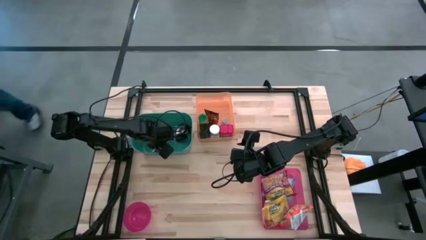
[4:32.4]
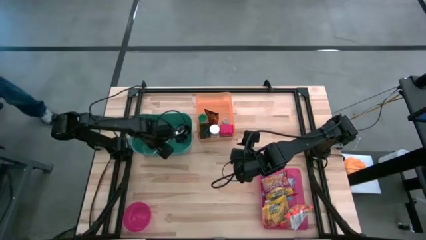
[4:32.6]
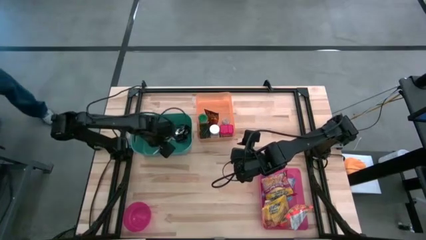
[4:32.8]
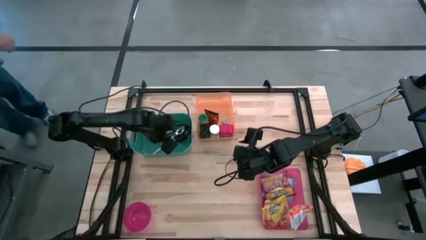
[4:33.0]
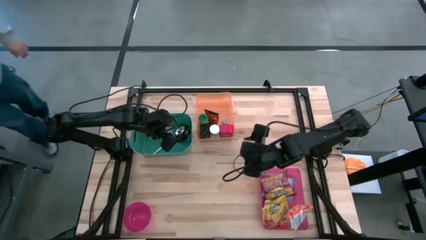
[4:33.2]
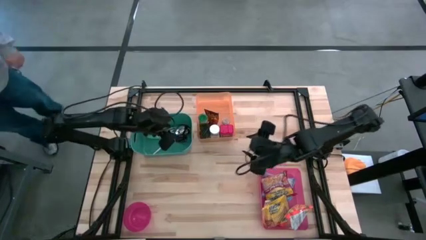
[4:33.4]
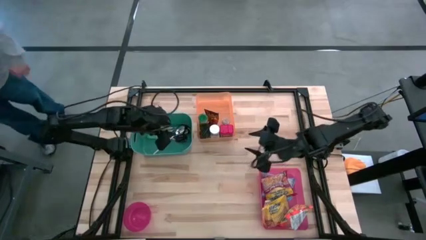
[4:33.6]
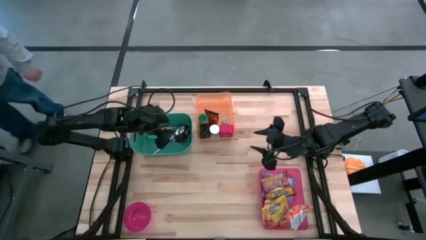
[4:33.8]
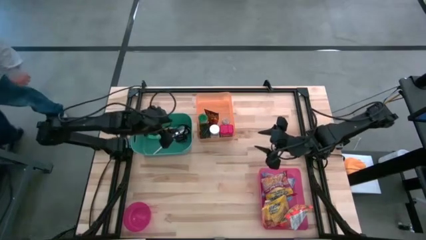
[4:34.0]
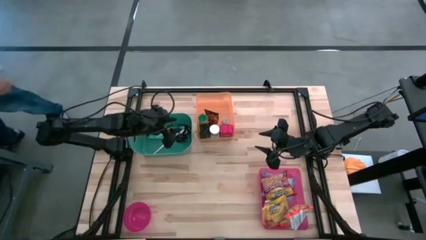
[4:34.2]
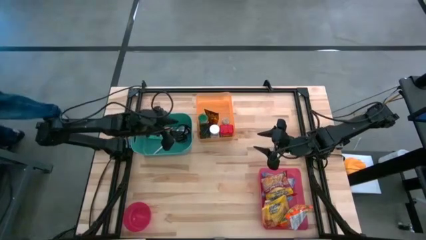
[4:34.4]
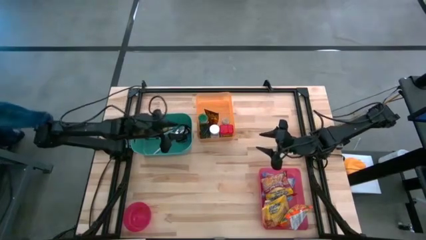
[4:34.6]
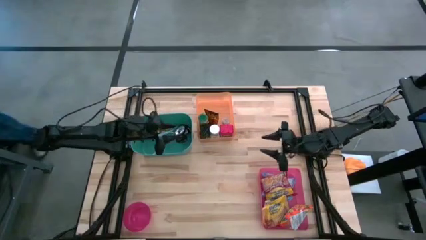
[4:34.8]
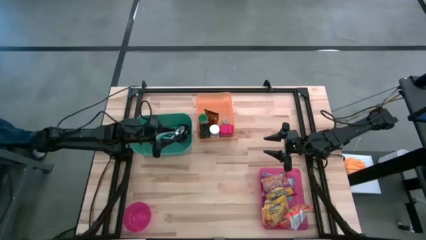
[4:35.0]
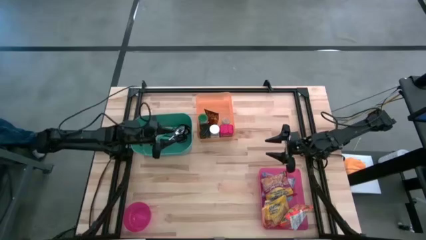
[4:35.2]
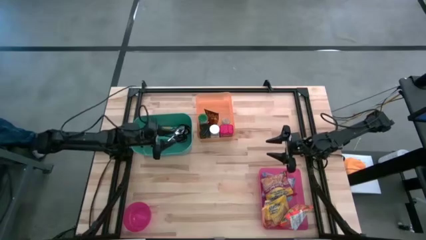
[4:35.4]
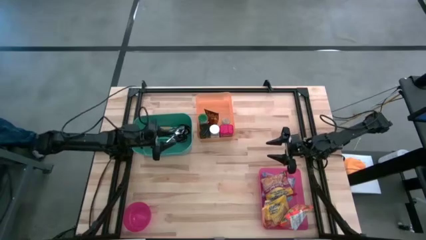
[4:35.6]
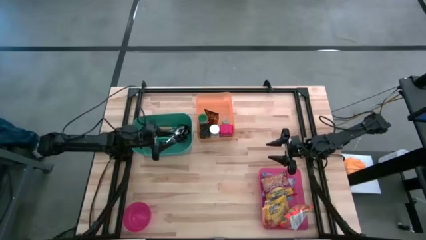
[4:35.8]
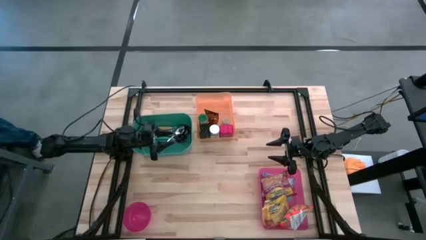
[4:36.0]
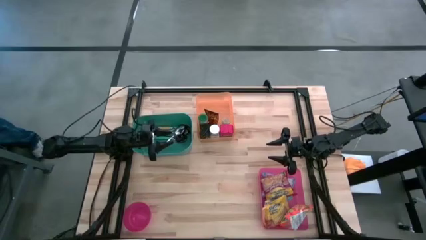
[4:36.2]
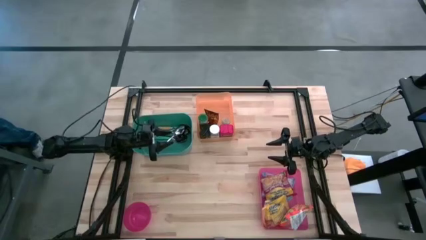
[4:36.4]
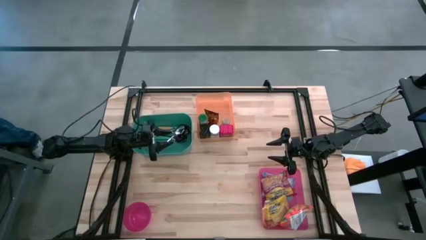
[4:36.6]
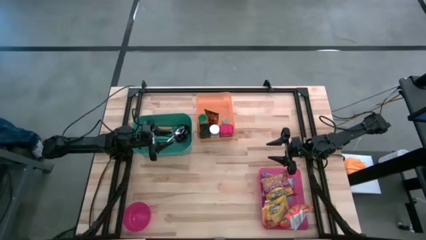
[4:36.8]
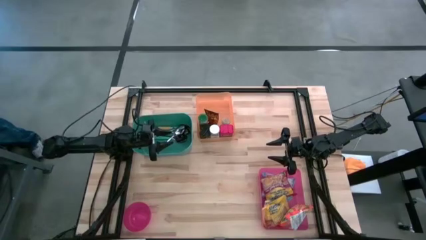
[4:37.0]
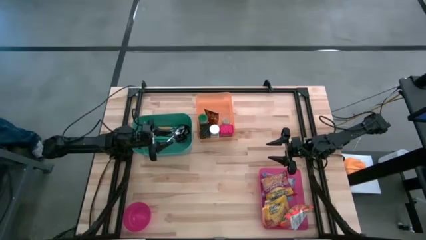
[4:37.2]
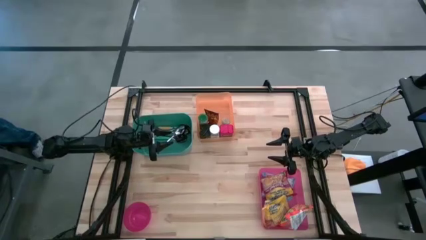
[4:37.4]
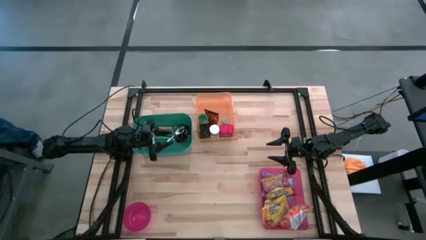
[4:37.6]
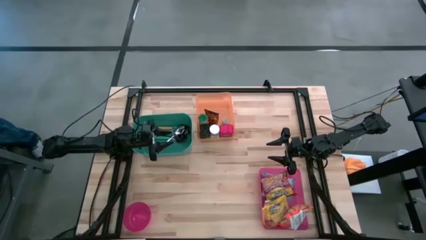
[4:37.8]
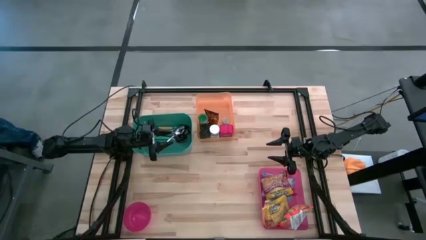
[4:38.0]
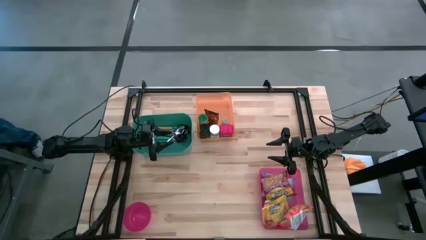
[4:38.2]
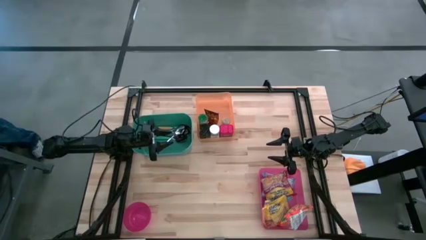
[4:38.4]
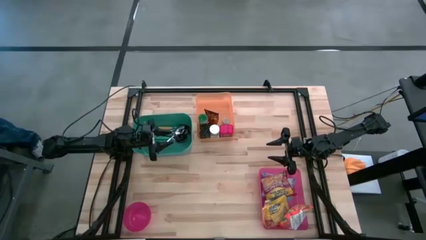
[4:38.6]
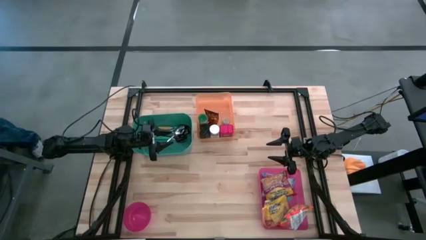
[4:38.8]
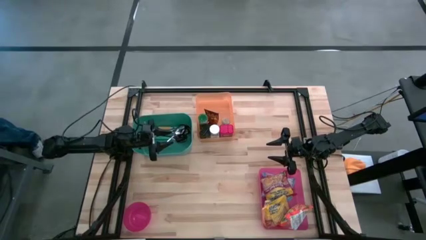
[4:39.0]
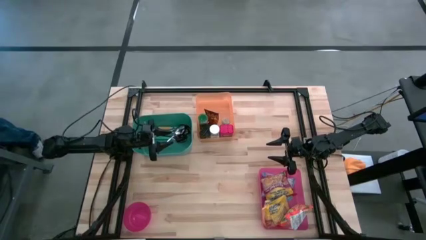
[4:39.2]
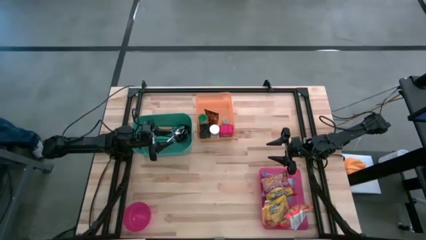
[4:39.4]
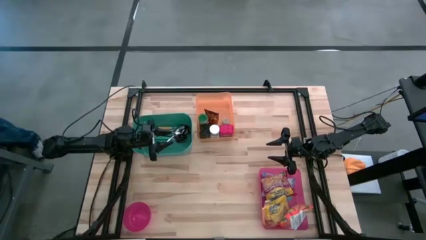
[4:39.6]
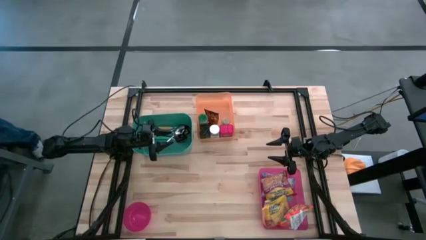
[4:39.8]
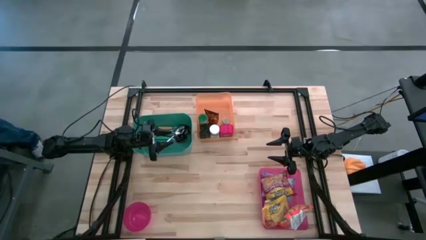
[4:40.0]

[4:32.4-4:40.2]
Return to Home Position
